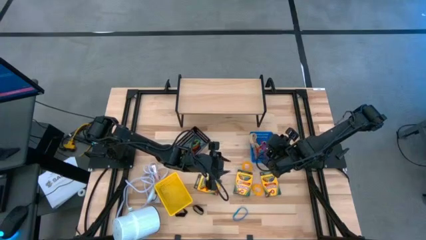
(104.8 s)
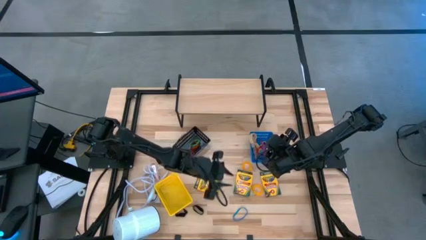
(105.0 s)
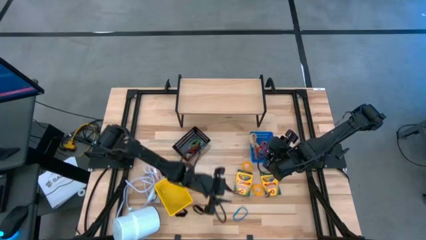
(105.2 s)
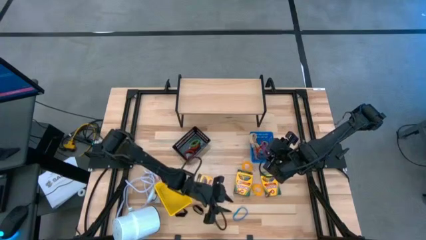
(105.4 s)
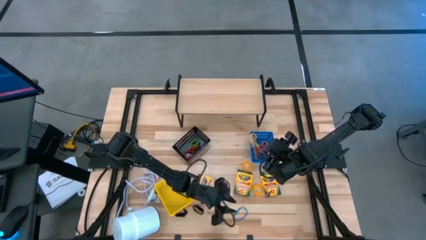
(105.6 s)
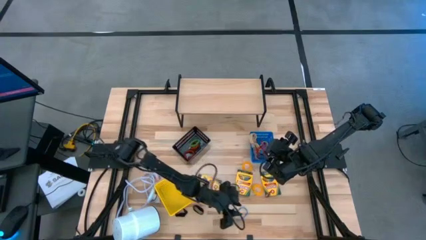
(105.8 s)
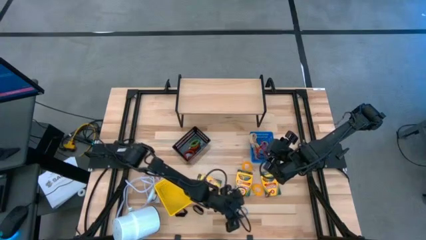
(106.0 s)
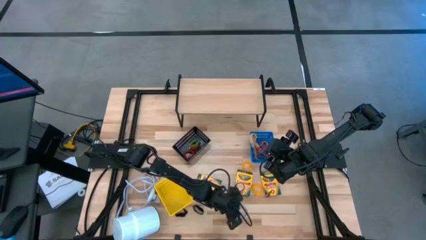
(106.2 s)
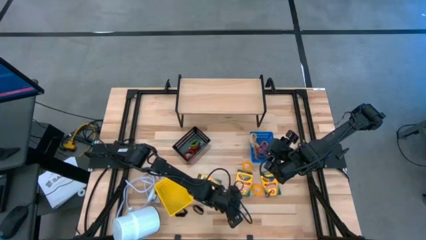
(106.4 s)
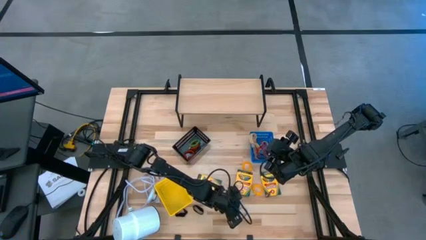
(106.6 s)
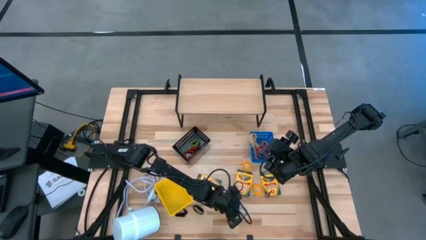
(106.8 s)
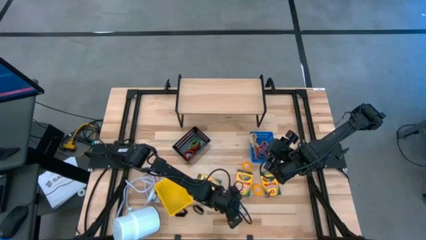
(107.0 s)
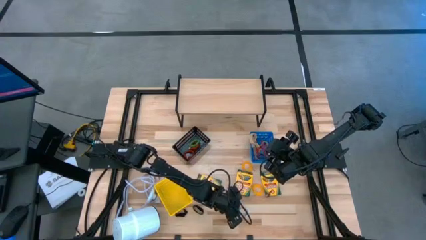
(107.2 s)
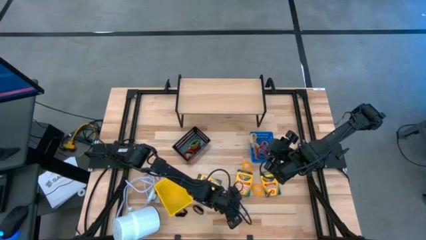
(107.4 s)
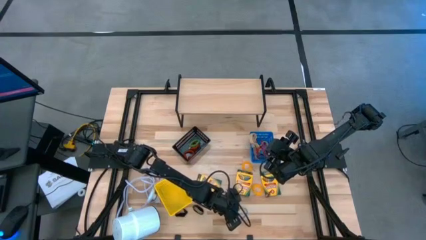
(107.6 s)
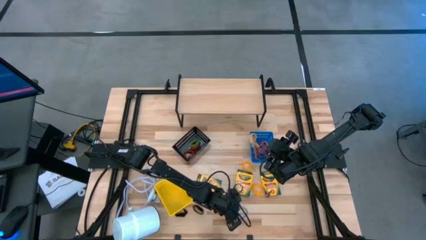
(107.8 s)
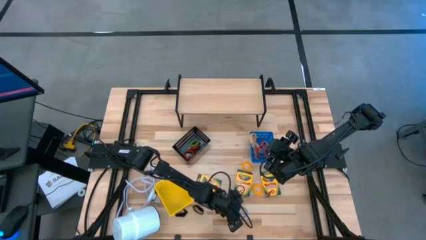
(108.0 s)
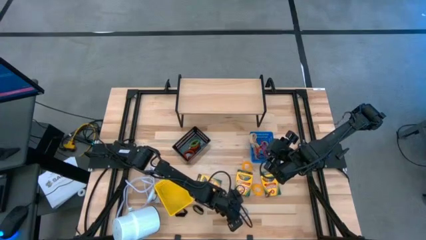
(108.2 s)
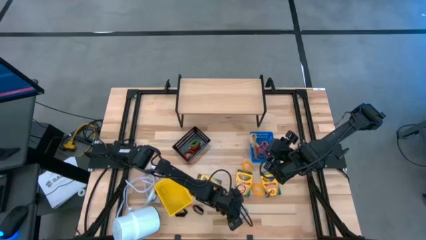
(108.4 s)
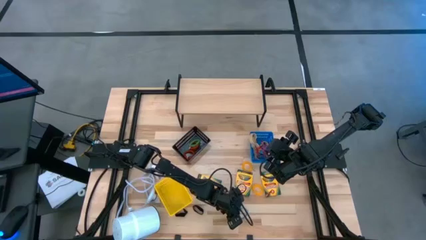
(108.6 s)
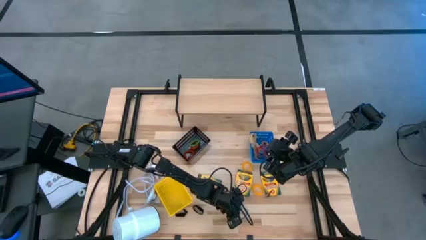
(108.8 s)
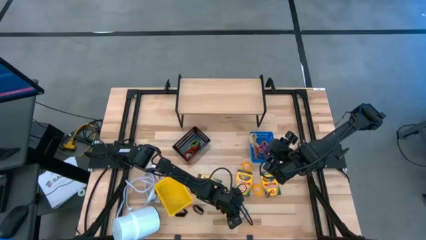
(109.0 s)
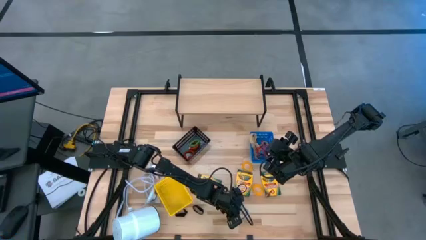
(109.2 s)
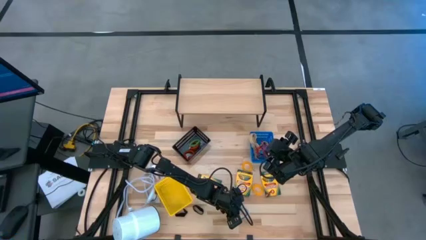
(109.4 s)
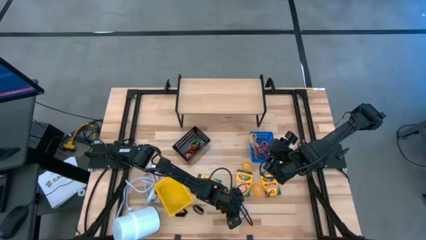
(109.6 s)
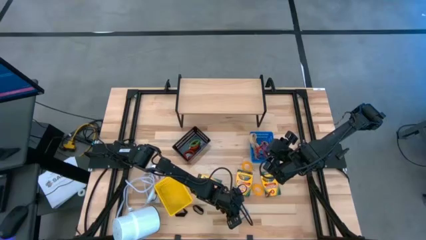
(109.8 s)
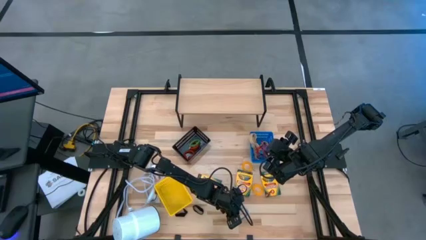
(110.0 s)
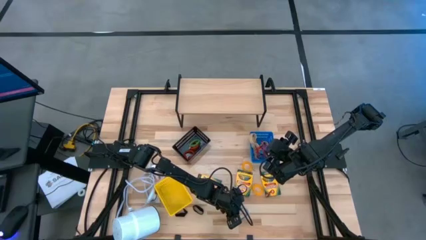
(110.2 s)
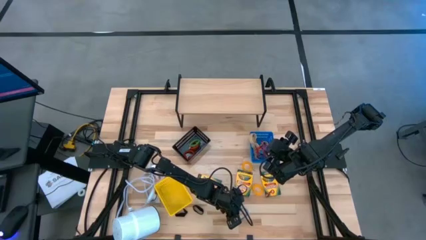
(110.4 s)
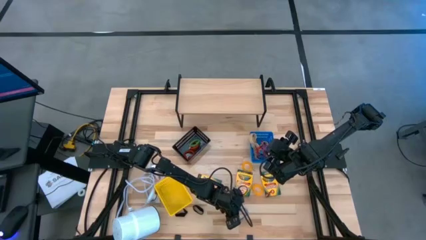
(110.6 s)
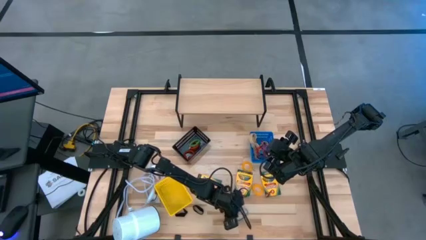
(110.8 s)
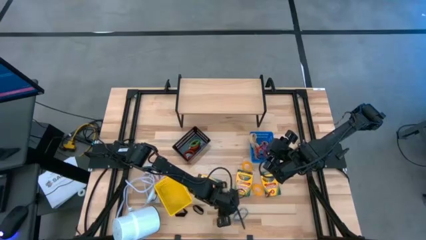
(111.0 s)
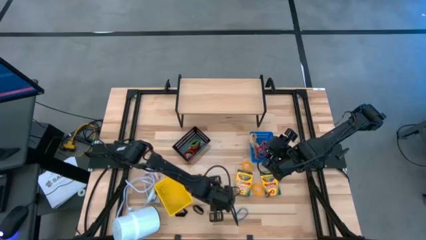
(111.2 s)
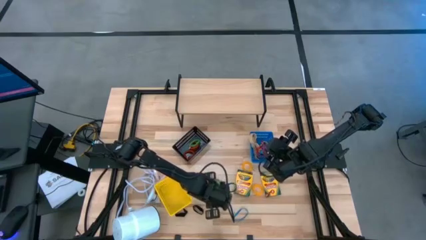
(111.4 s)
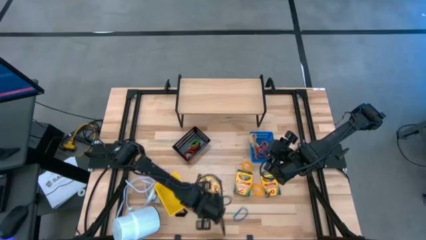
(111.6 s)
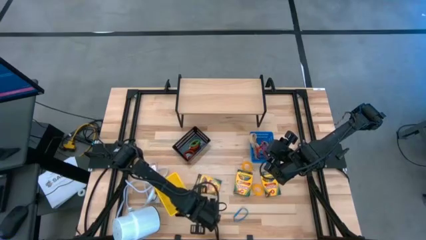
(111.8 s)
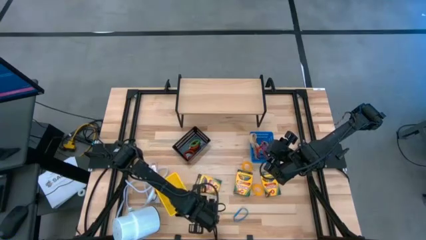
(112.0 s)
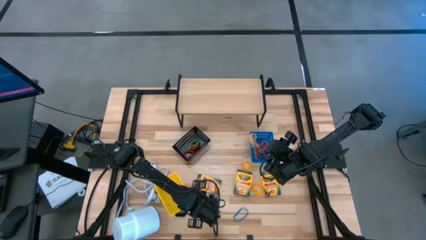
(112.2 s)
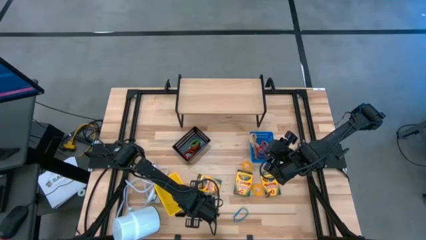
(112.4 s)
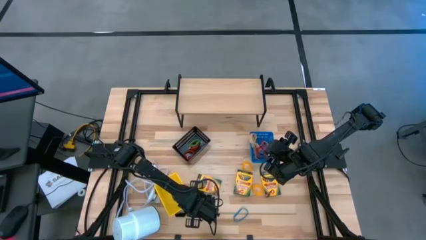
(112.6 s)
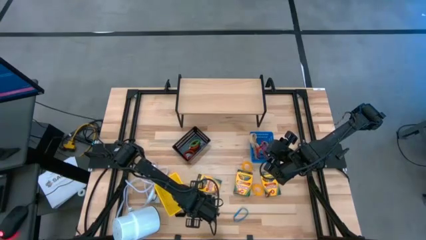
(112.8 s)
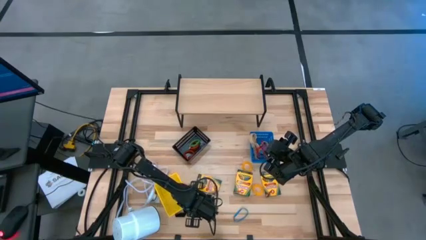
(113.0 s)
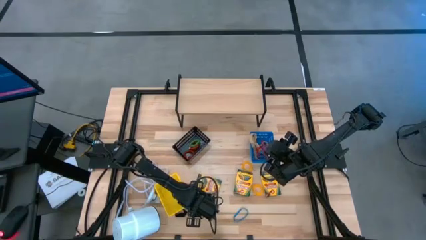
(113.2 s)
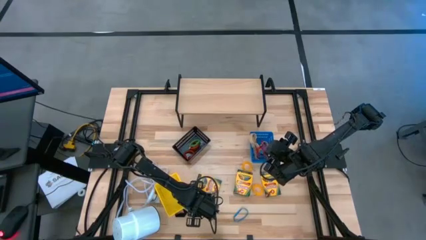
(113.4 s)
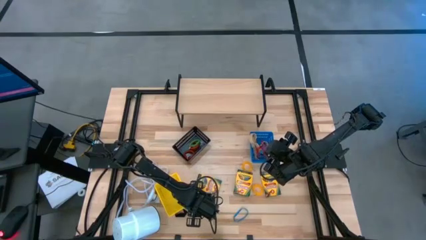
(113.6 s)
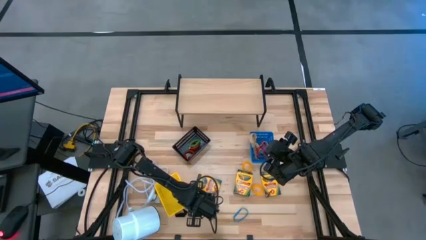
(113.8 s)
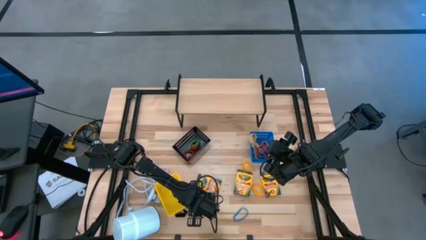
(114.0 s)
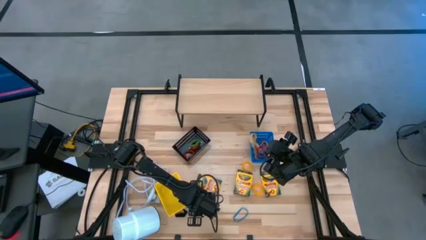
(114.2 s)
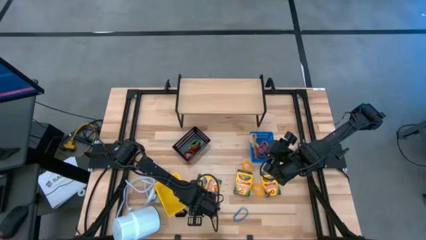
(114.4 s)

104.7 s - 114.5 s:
Task: Pick & Place Office Desk Supplies
Put the black rubber band into the blue bin

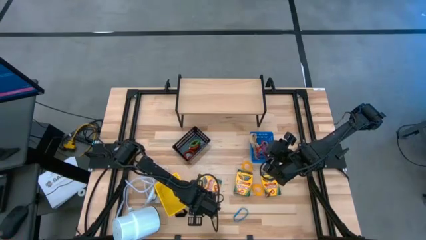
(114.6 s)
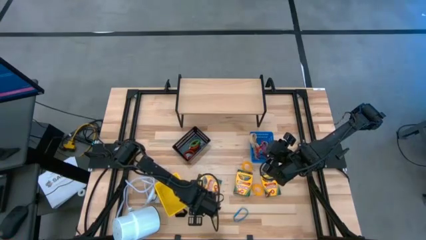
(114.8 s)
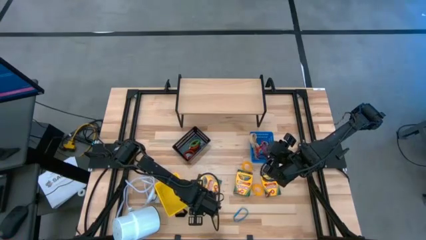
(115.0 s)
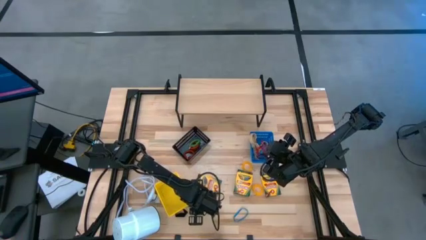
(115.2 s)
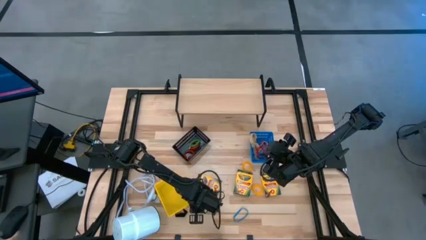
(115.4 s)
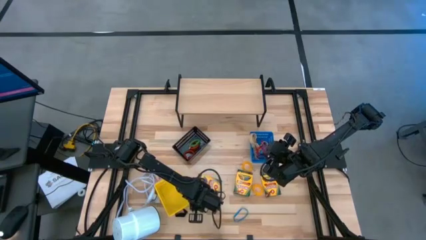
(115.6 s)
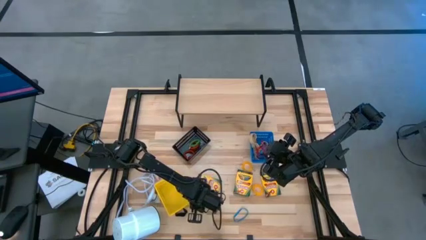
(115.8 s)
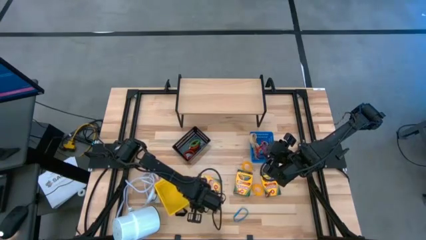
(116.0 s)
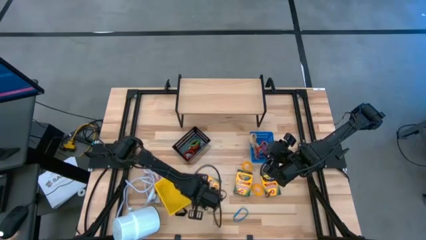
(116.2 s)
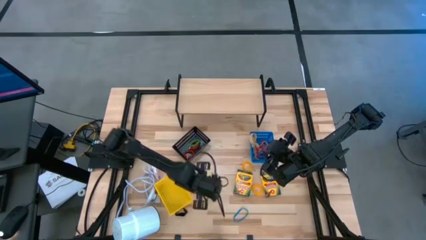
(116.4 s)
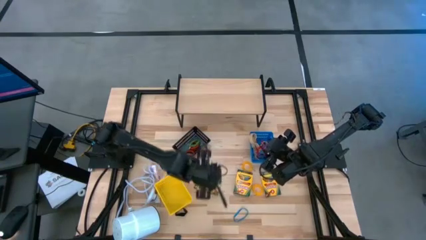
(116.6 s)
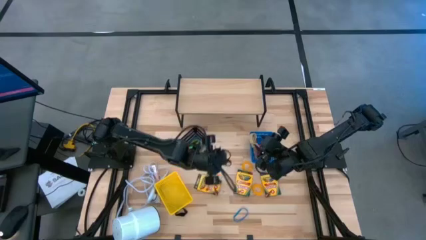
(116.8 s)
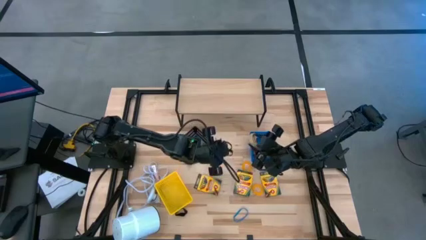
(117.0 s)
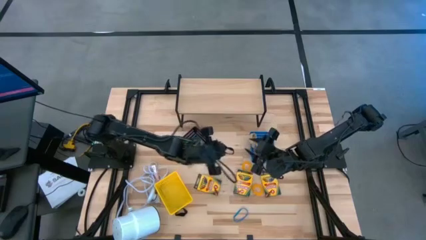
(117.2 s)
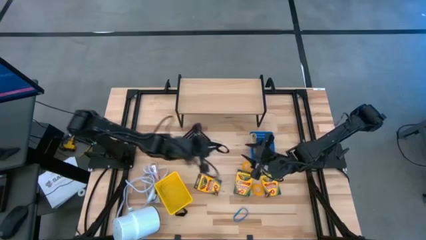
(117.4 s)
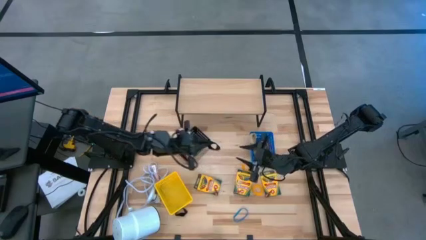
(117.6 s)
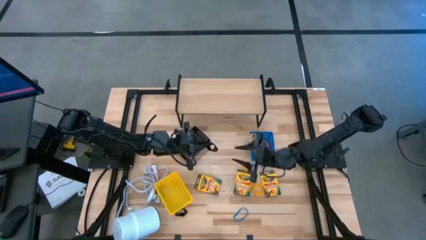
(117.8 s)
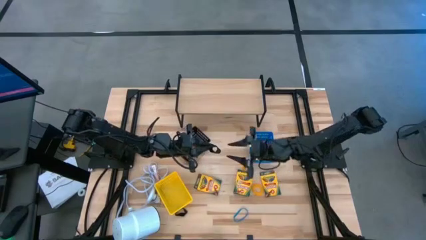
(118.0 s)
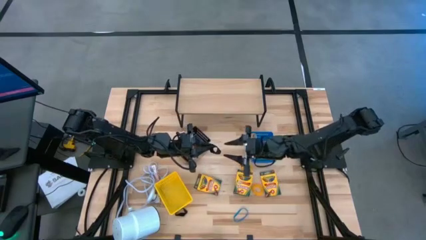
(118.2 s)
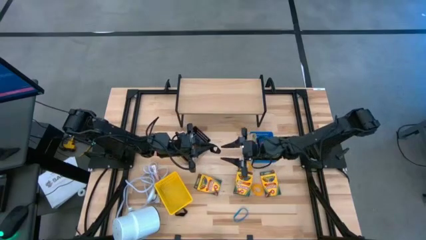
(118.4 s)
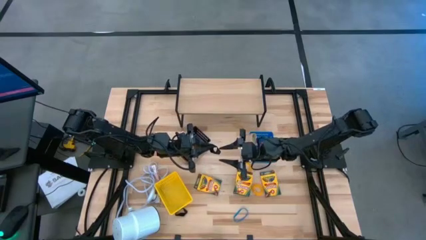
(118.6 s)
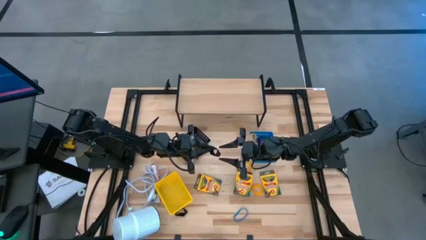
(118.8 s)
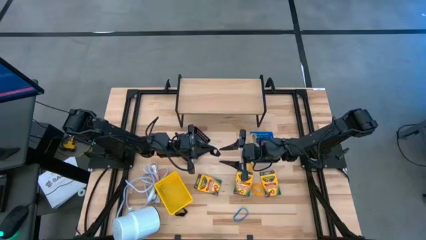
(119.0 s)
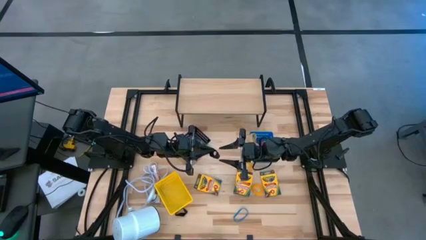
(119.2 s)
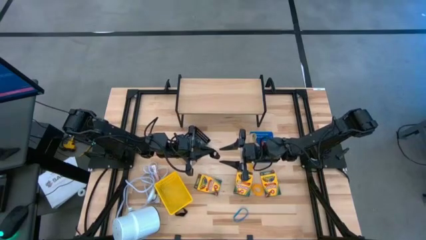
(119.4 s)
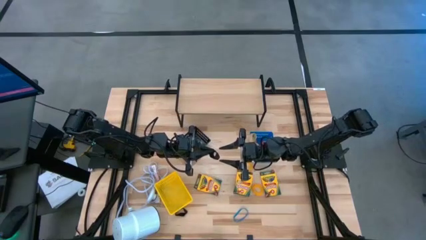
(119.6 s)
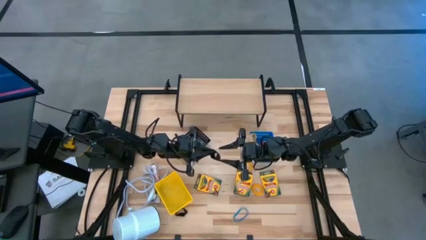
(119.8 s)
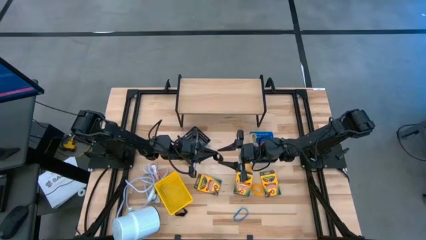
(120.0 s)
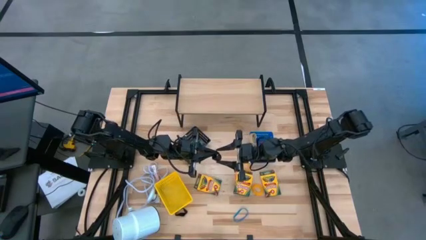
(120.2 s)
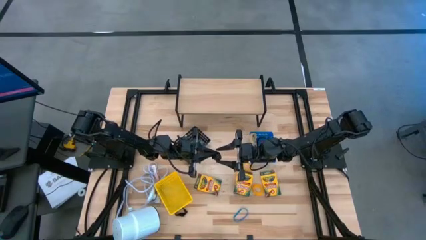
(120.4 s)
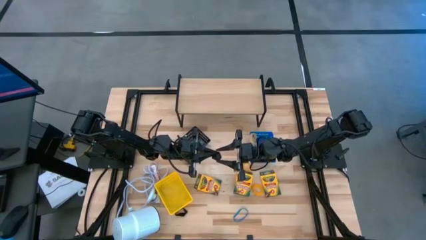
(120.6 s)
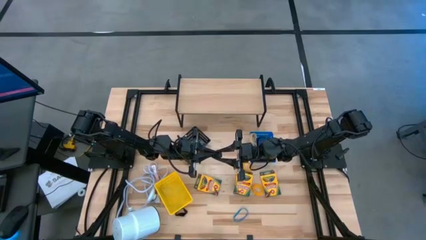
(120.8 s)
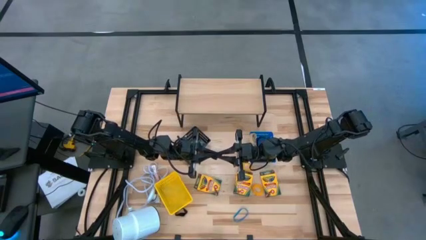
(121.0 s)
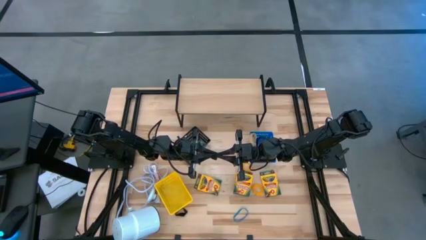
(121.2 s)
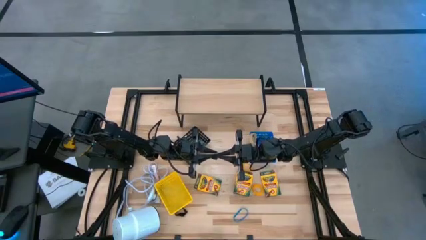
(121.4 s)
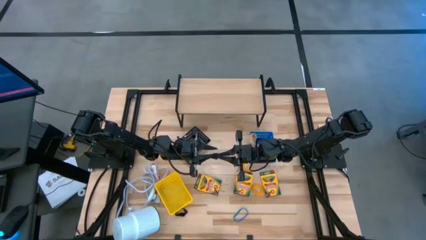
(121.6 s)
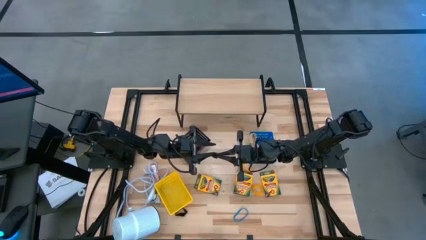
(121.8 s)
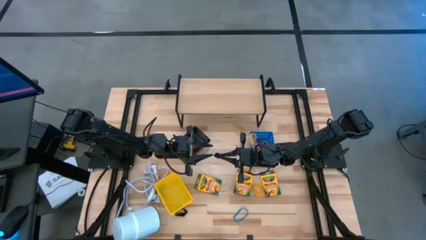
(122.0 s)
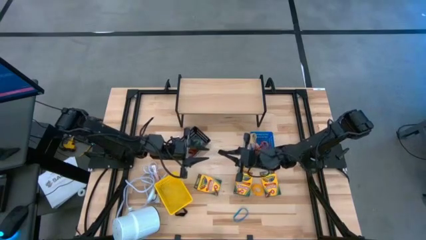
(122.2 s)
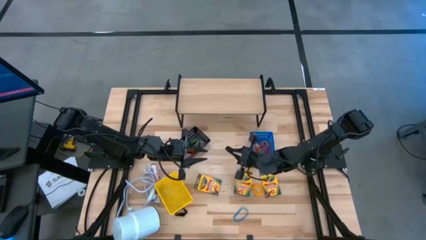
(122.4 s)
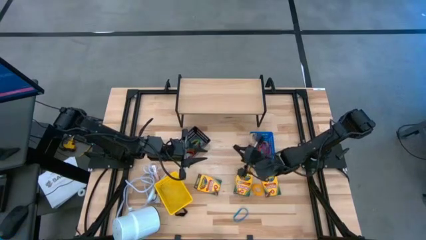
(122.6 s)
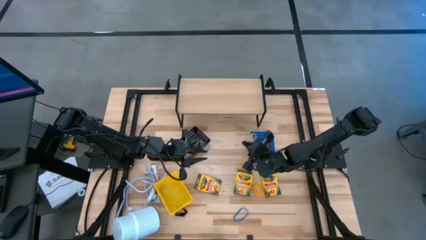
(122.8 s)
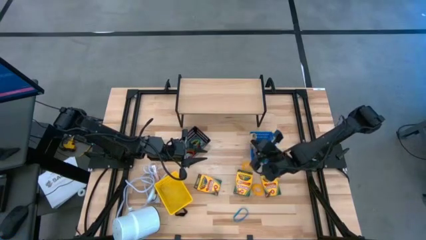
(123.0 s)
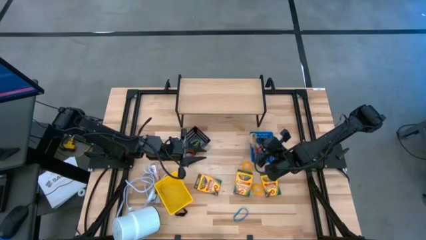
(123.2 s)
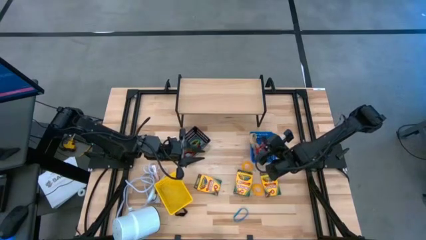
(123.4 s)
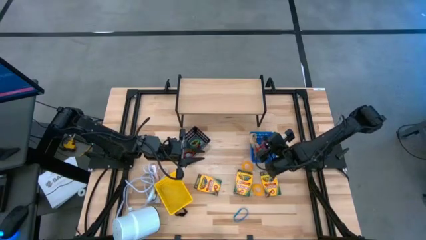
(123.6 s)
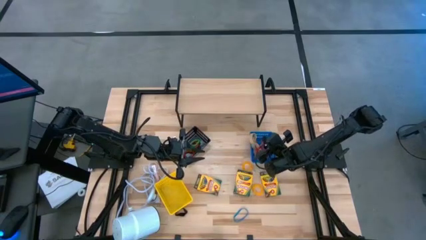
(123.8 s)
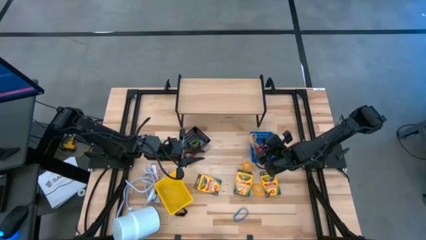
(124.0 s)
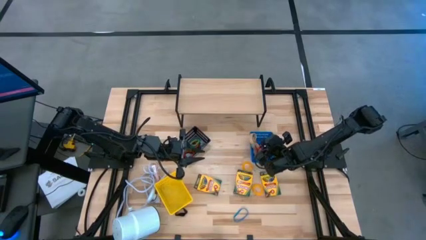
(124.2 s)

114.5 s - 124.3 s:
Put the black rubber band into the blue bin
